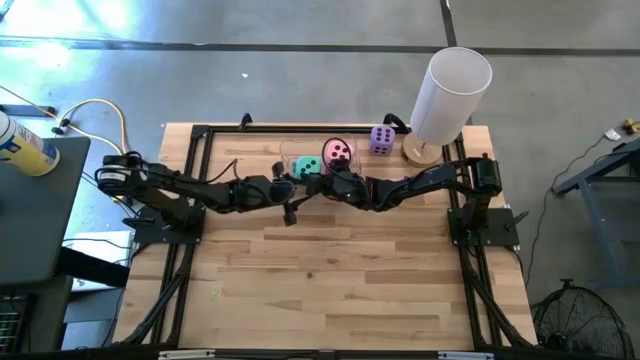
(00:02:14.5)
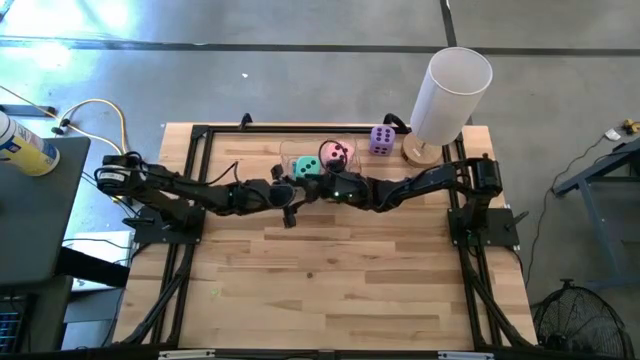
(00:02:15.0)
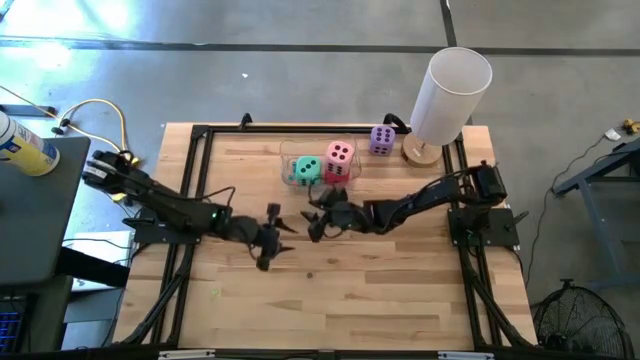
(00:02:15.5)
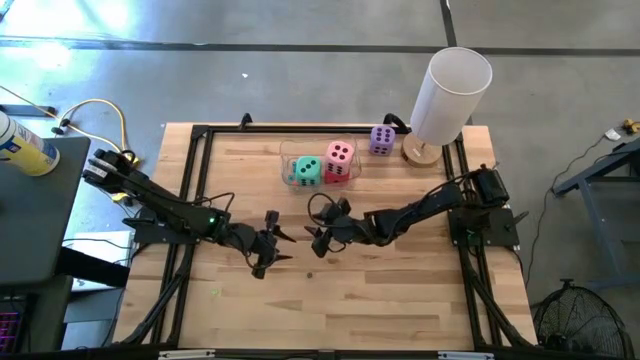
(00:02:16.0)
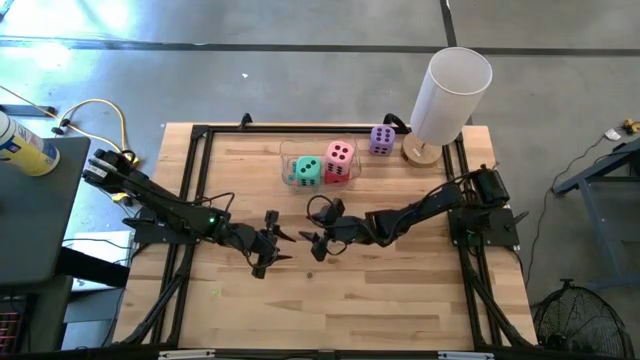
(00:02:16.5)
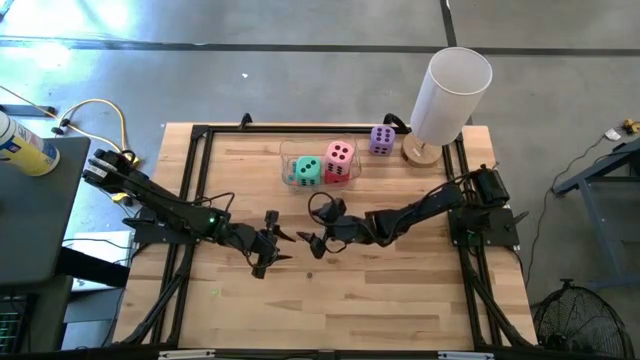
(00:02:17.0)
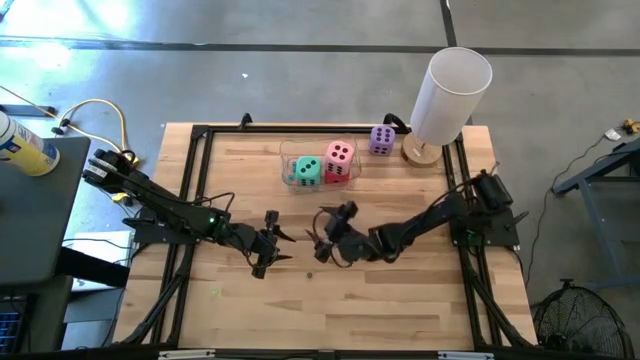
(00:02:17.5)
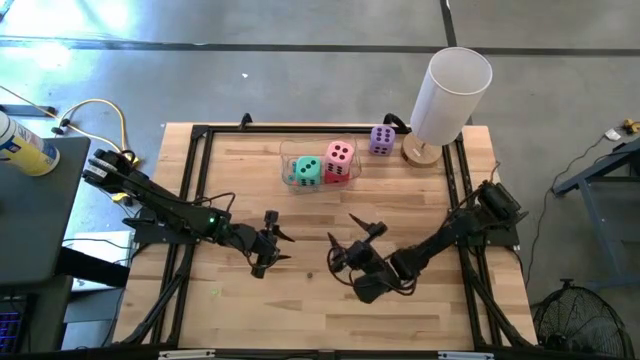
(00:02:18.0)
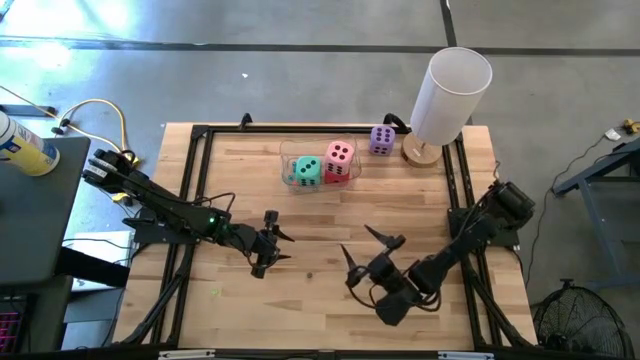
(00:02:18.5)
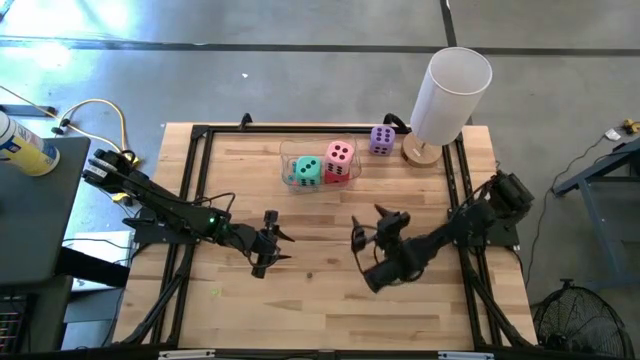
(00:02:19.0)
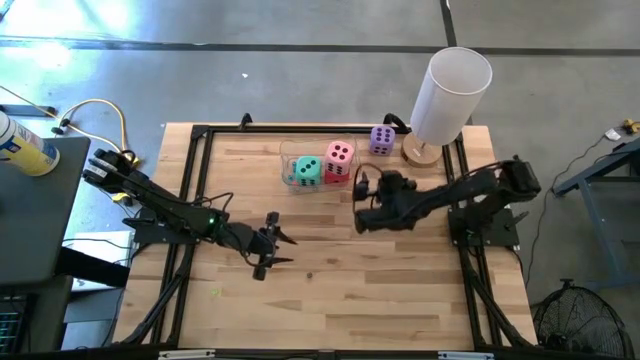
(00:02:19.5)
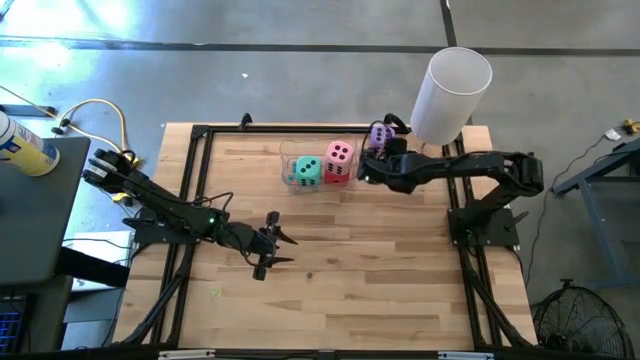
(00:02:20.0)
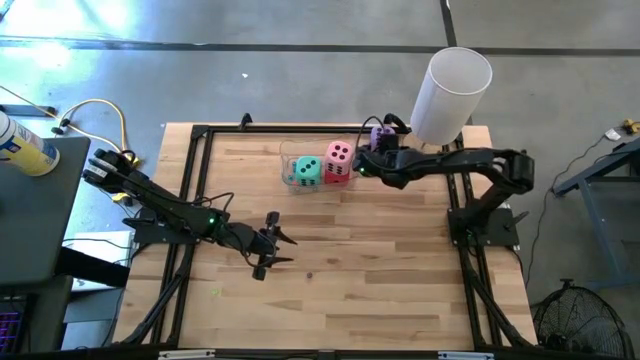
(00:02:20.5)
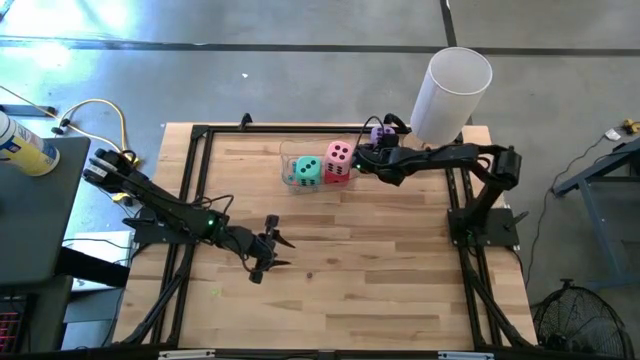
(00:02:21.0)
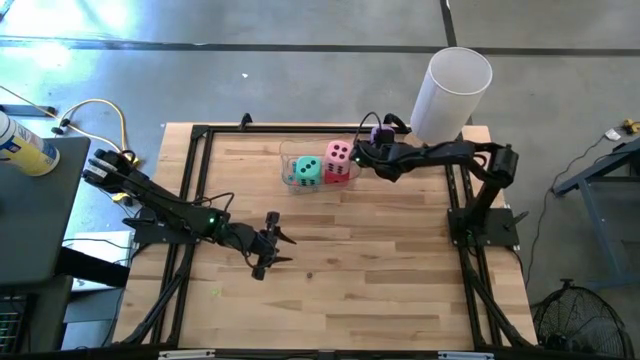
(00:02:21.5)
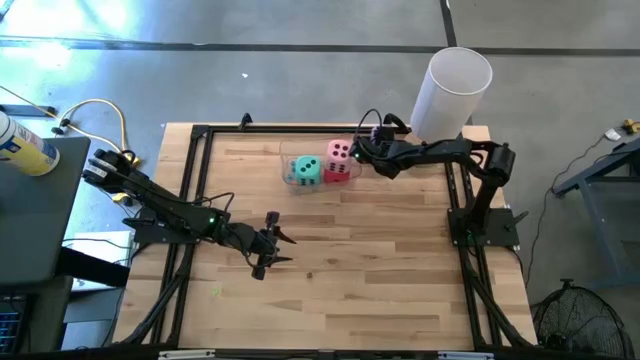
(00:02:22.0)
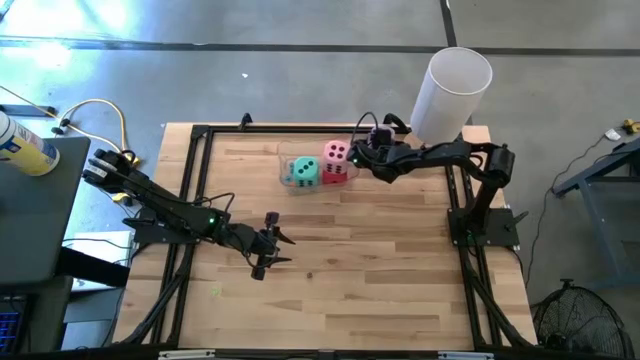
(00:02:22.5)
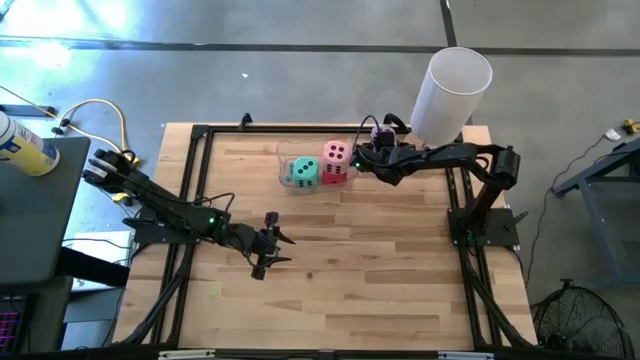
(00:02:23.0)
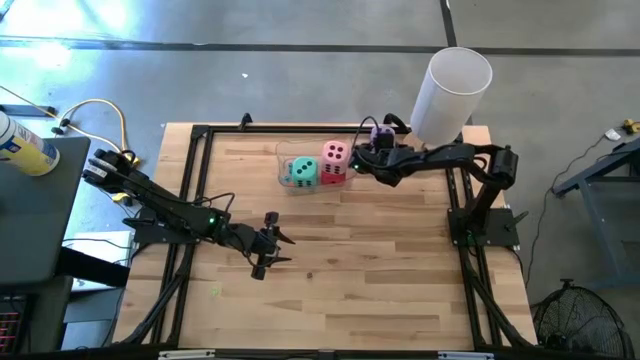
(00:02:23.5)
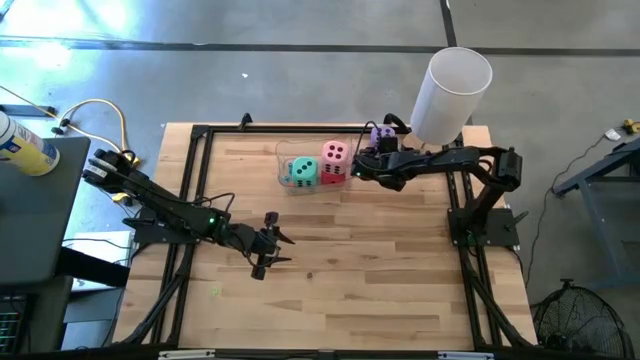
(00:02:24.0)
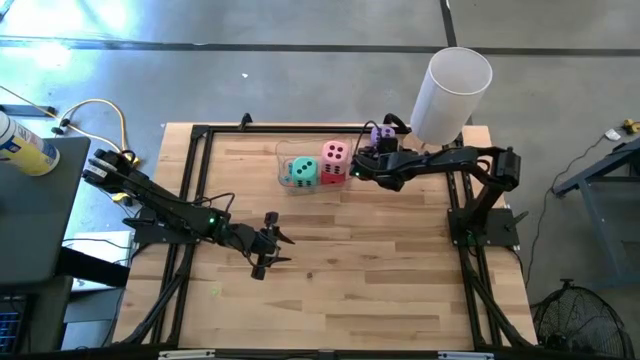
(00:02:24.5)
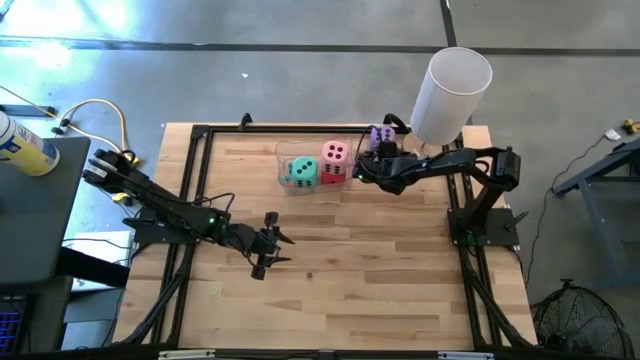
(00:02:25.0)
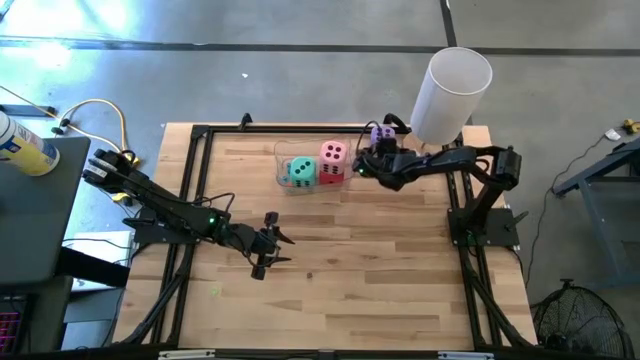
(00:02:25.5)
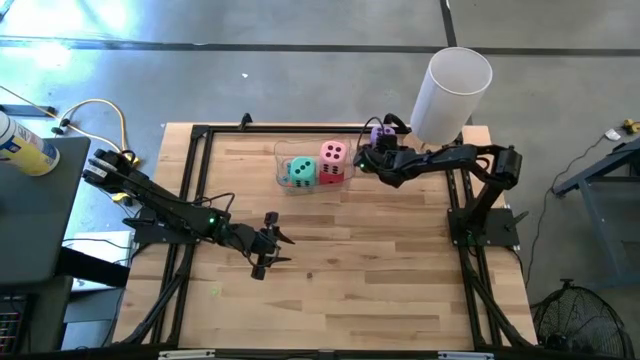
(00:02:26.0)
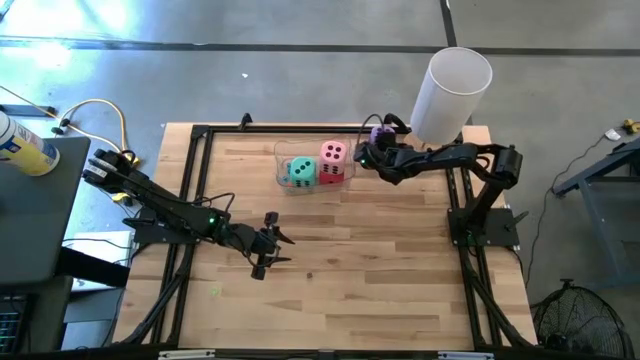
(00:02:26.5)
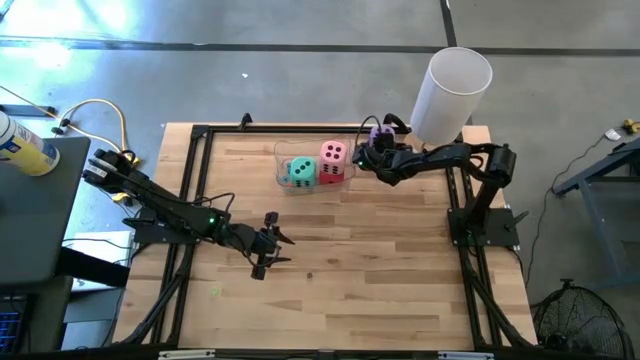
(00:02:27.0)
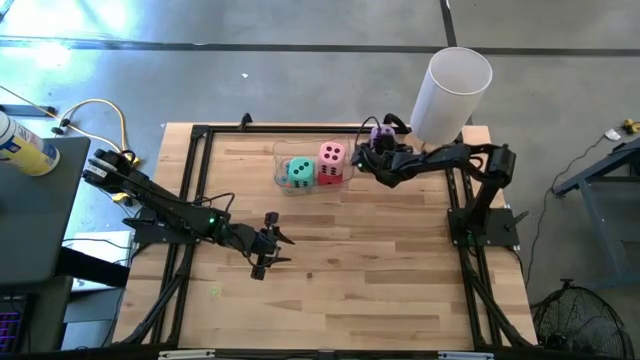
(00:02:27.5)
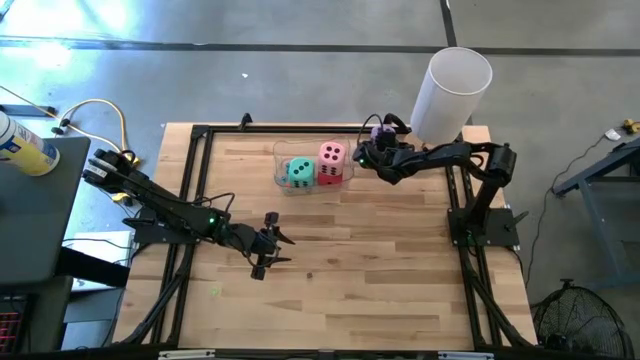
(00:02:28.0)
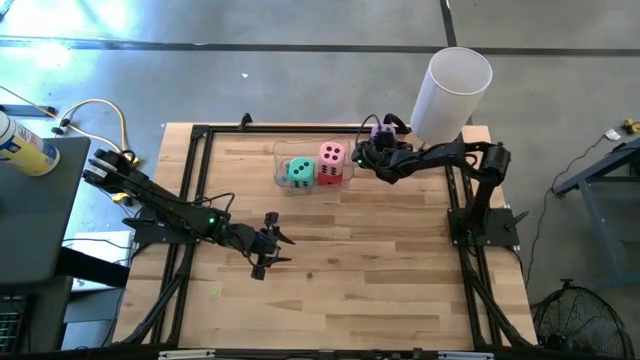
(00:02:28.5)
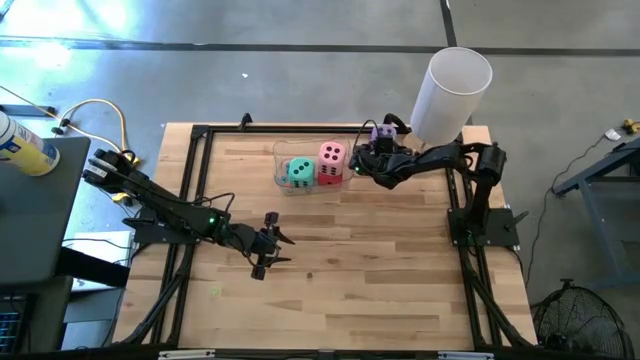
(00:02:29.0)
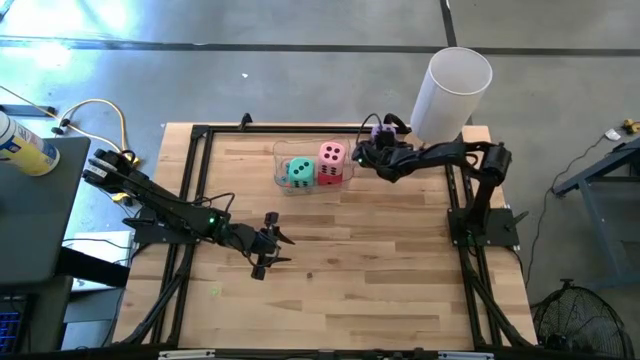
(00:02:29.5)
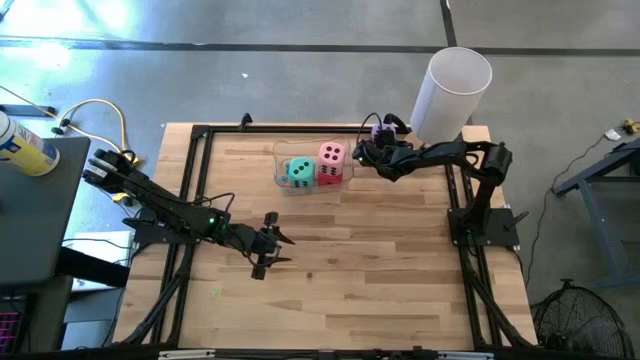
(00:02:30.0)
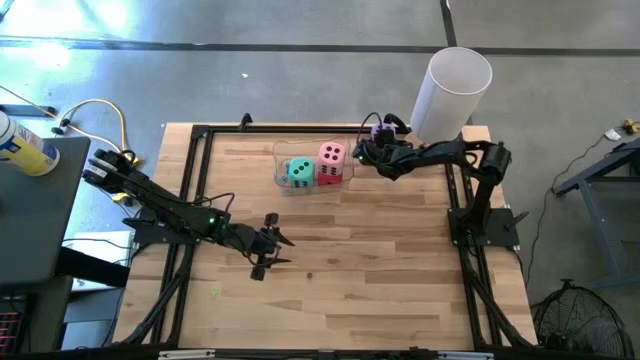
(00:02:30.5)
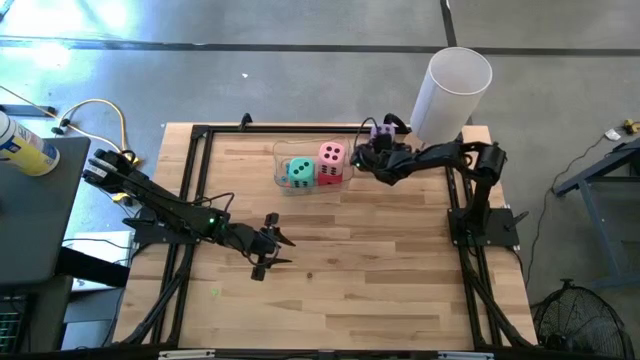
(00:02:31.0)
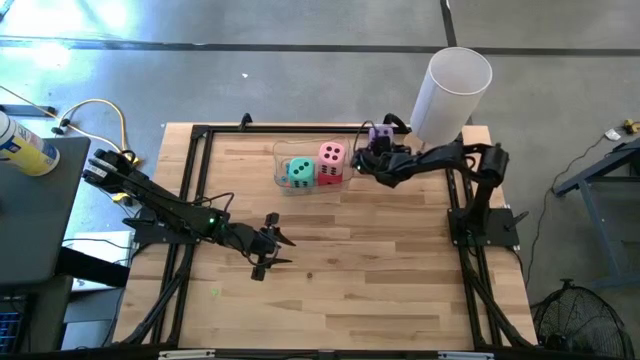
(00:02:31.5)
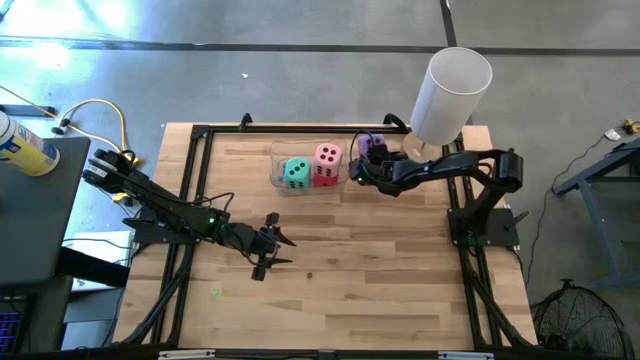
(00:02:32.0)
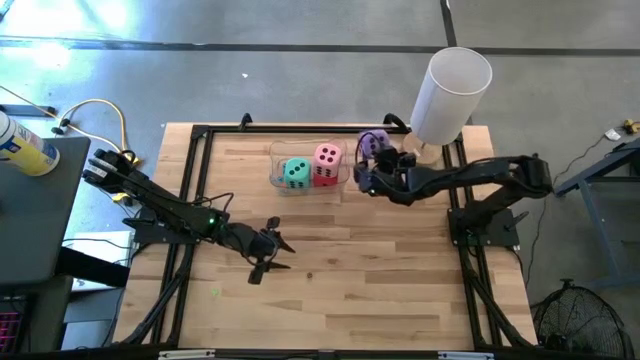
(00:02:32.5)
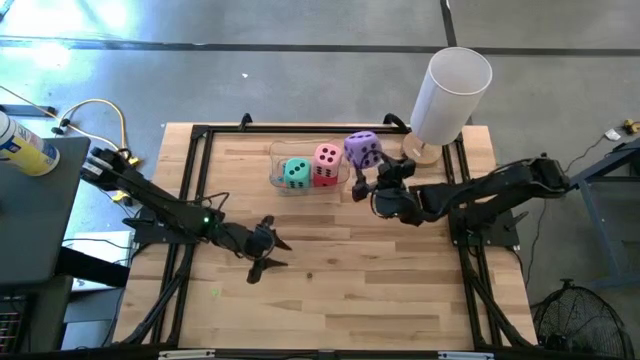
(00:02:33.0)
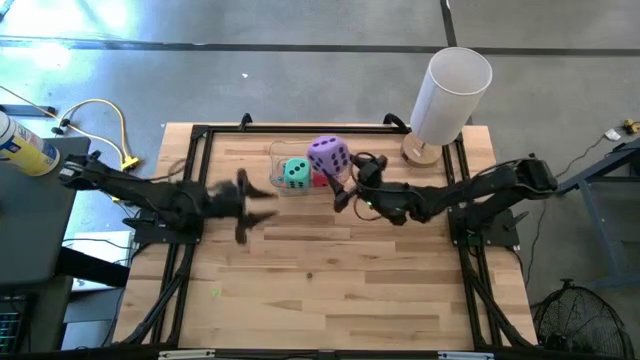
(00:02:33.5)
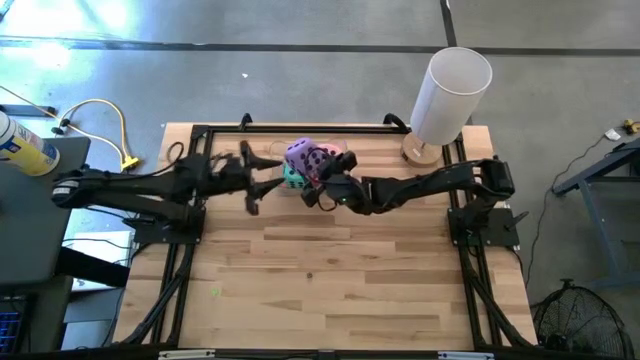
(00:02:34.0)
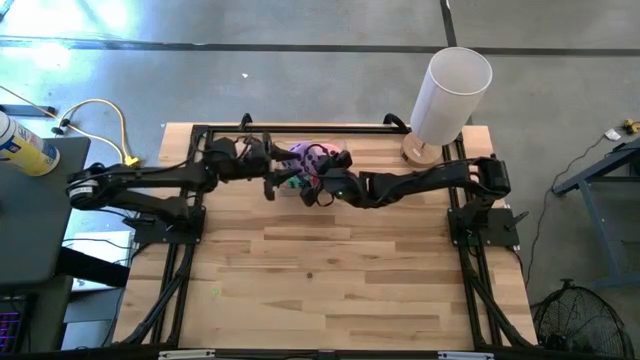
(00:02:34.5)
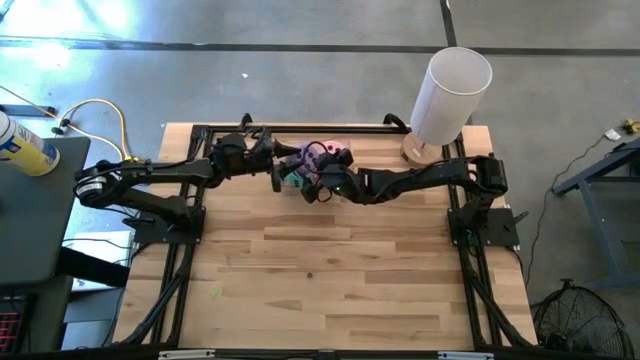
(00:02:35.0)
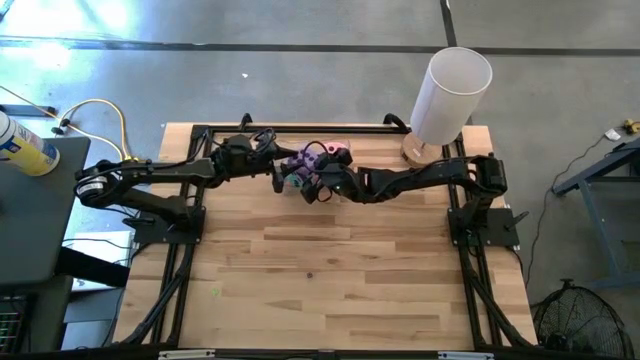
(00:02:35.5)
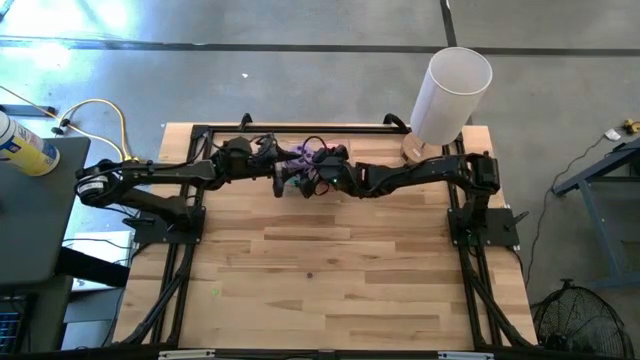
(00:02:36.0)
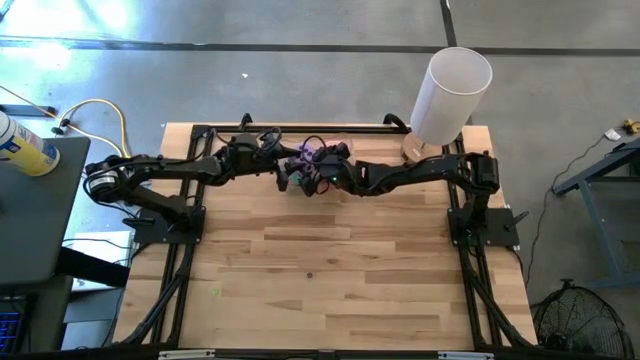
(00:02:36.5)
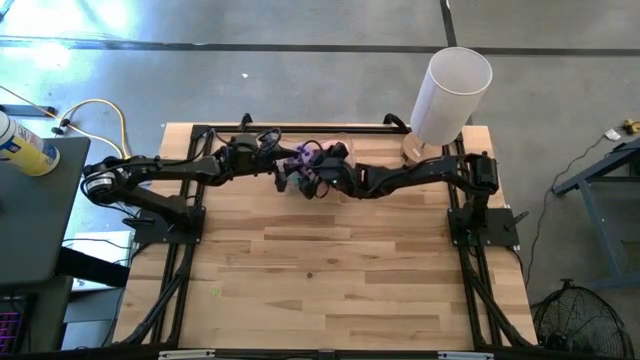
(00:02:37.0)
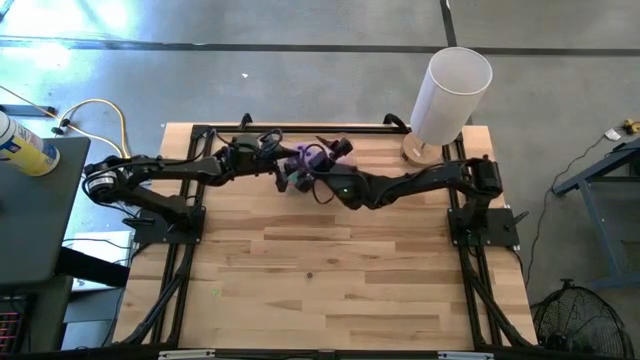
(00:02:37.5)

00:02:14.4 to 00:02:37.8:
Task: Pick & Place Dice
Put the large purple dice into the transparent bin
